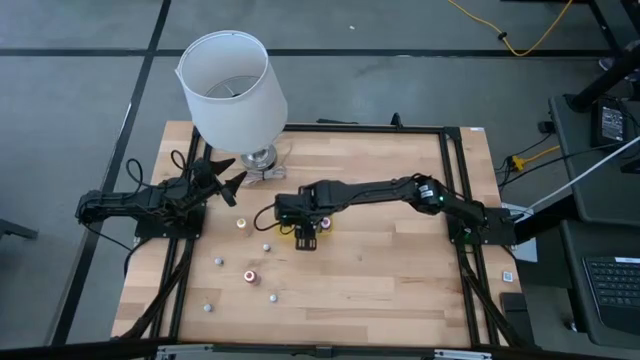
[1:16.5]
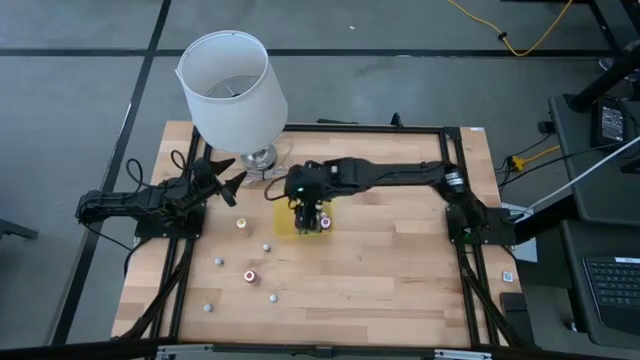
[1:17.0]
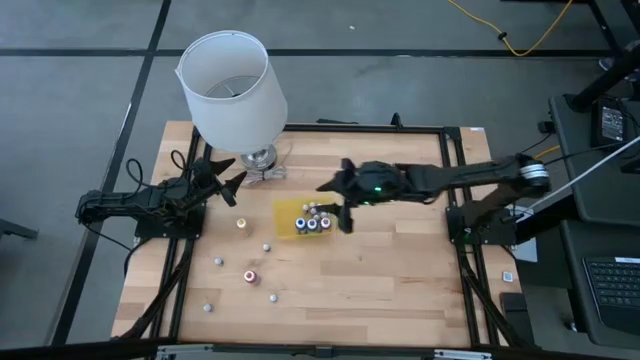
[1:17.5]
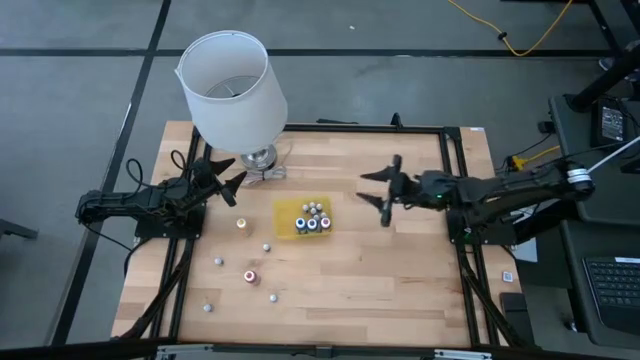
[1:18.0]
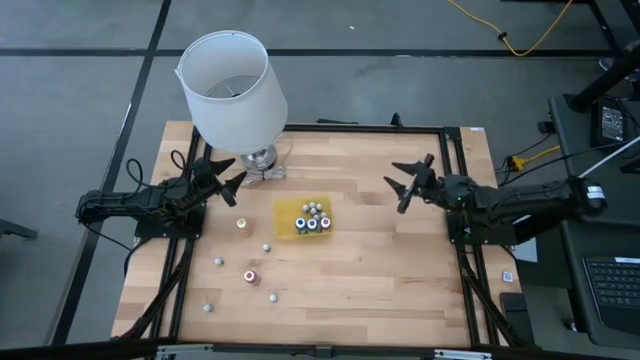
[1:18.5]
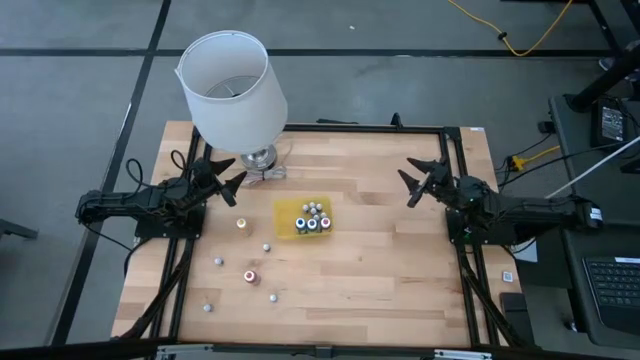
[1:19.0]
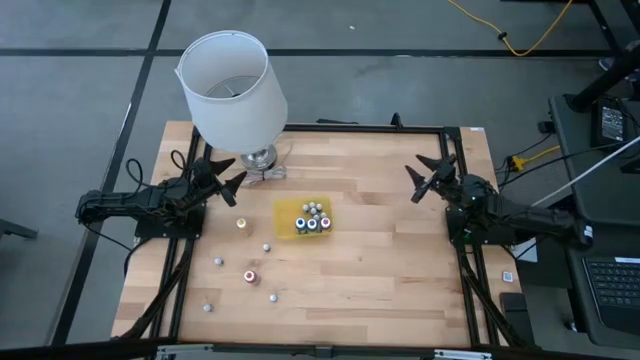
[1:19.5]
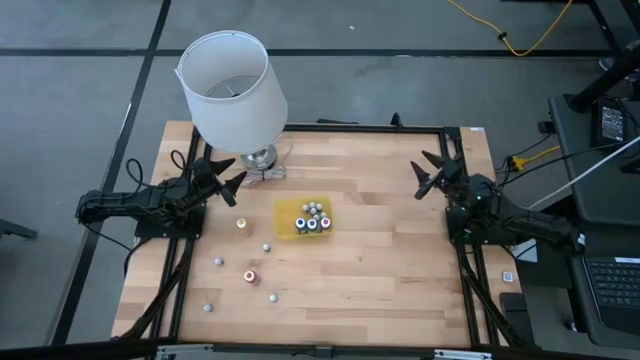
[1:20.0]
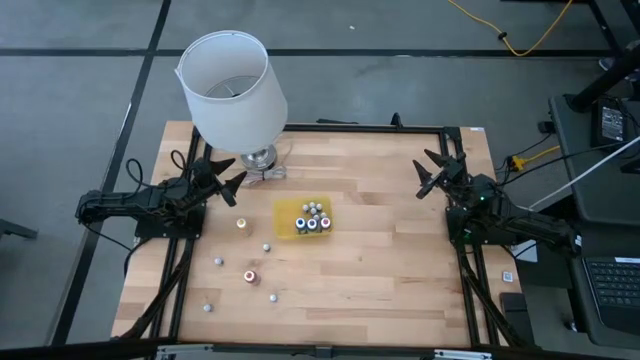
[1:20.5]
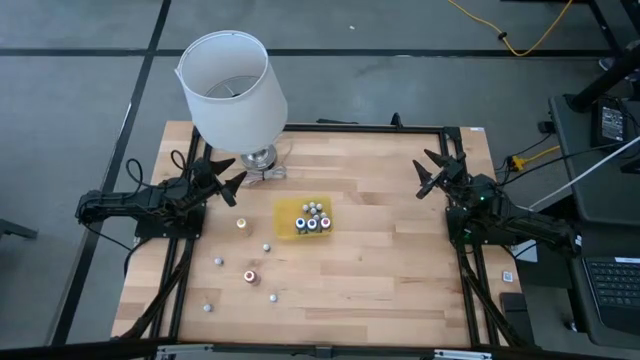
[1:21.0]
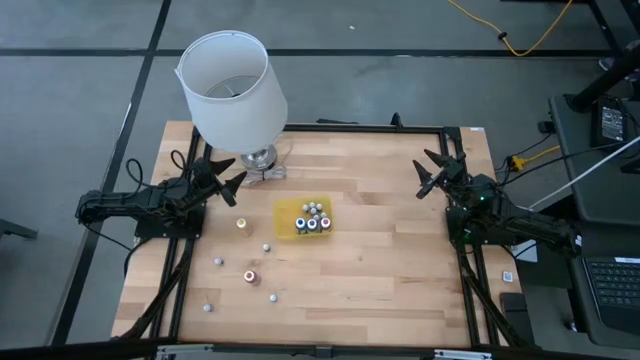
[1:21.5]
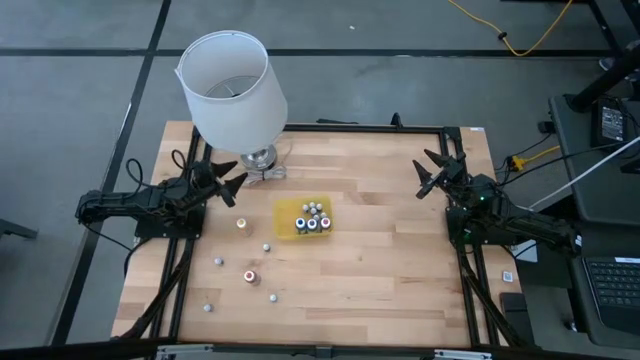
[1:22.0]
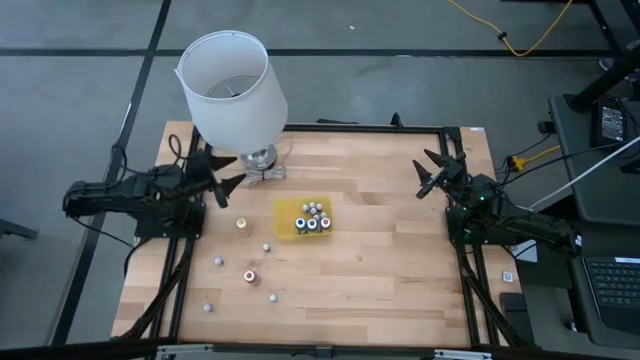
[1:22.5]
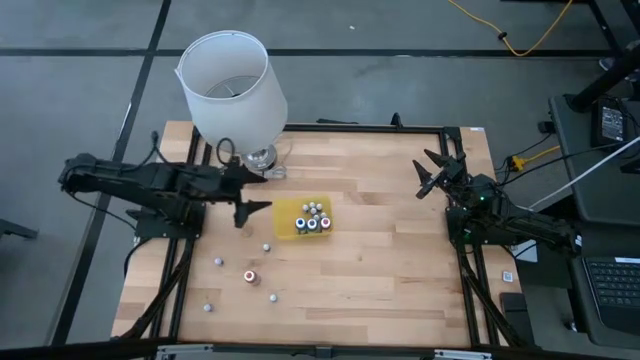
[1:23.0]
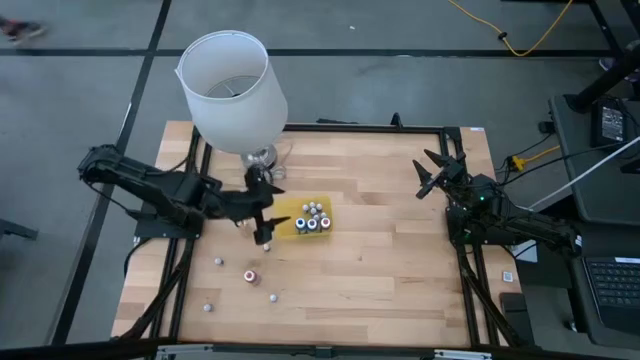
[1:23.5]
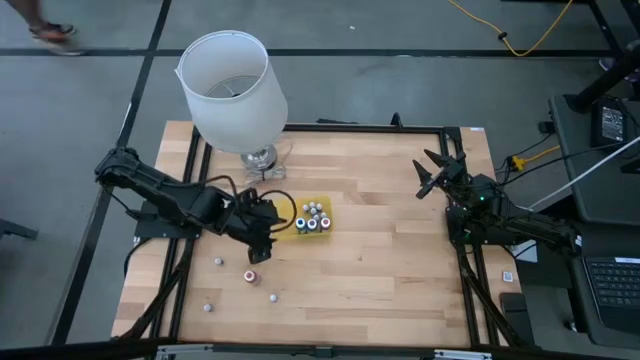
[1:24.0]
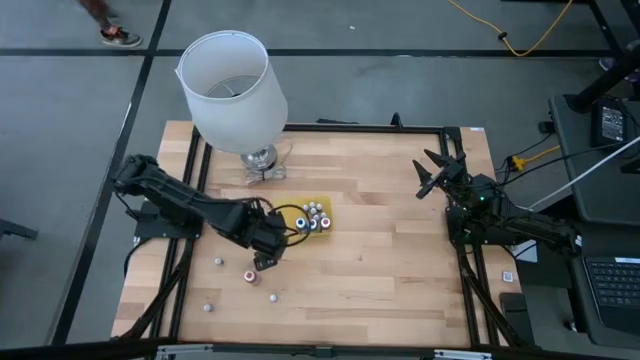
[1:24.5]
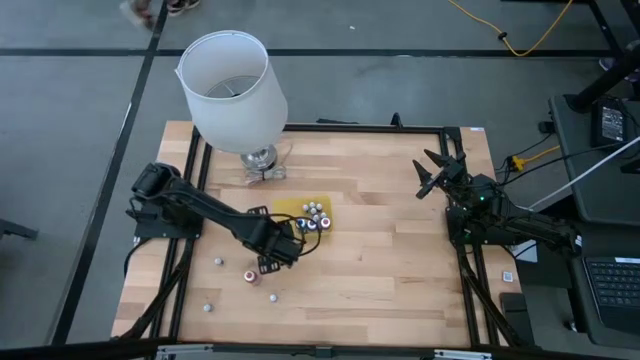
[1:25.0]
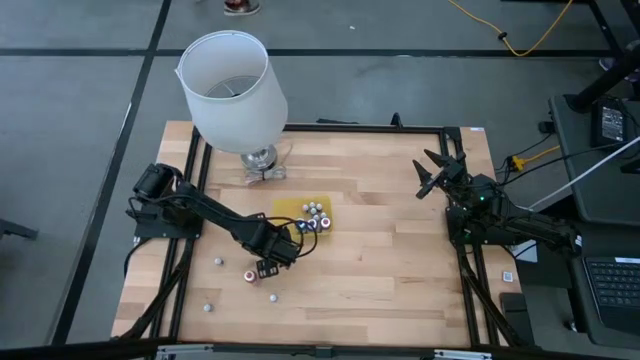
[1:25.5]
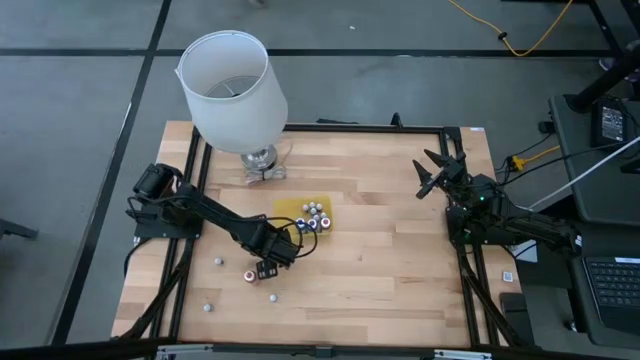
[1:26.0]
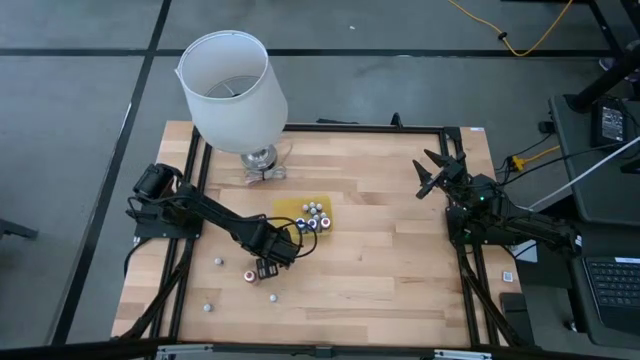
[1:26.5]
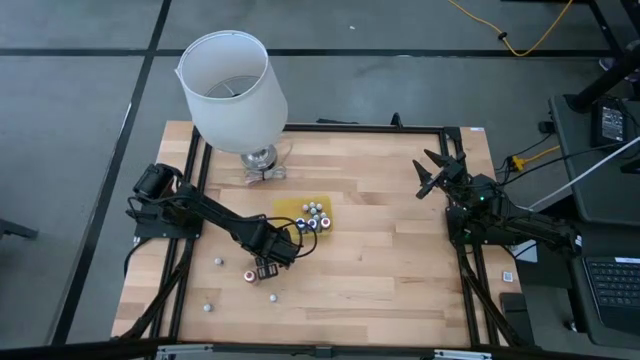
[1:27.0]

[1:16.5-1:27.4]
Task: Pick & Place food coloring
Put the black food coloring bottle into the yellow bin

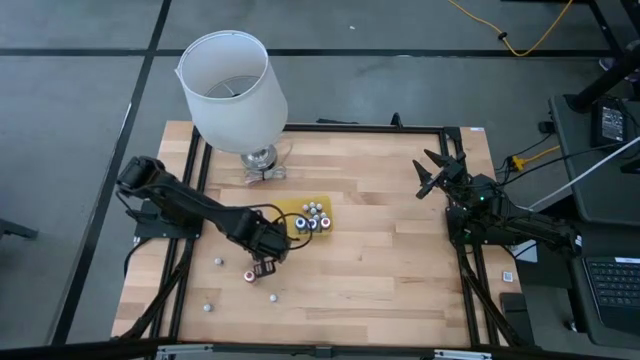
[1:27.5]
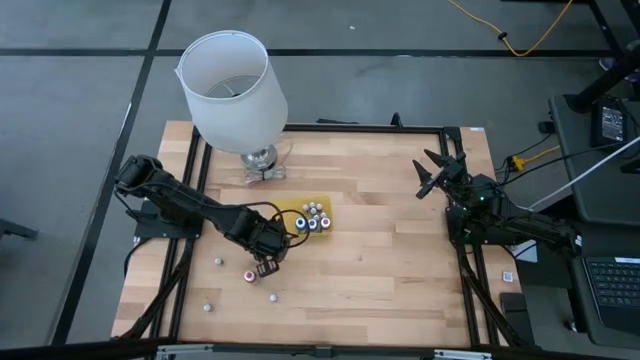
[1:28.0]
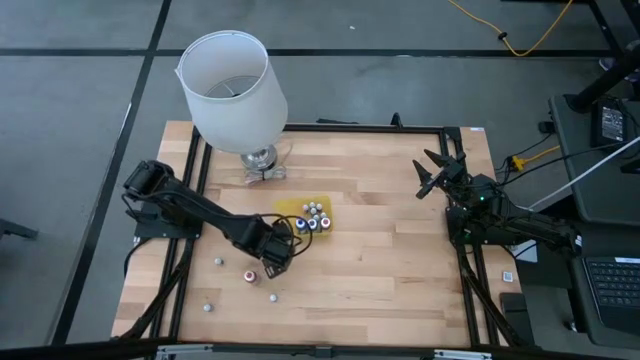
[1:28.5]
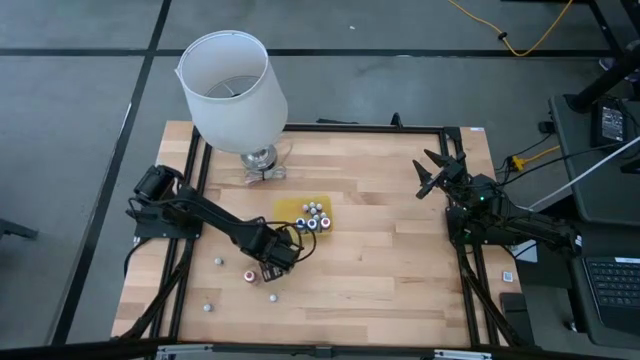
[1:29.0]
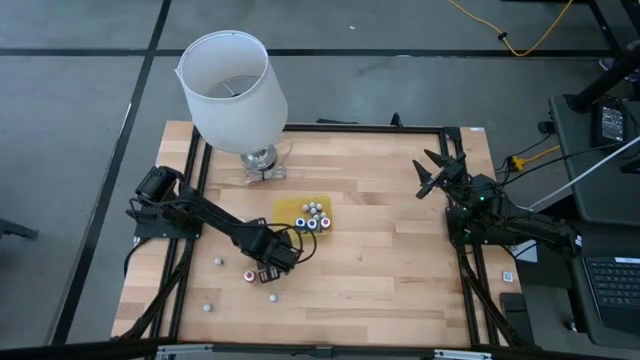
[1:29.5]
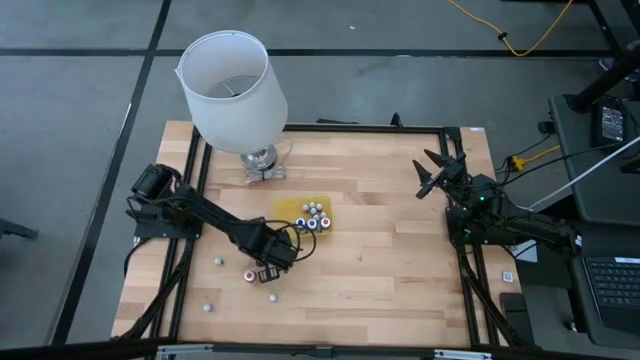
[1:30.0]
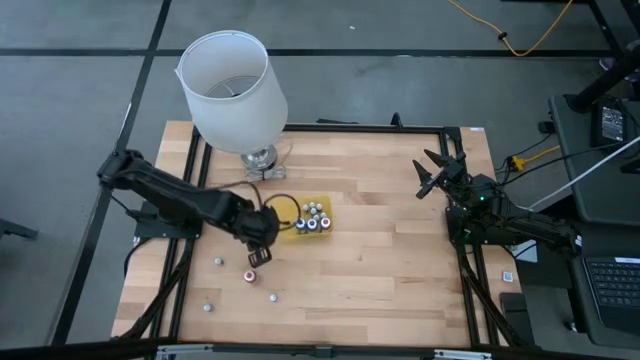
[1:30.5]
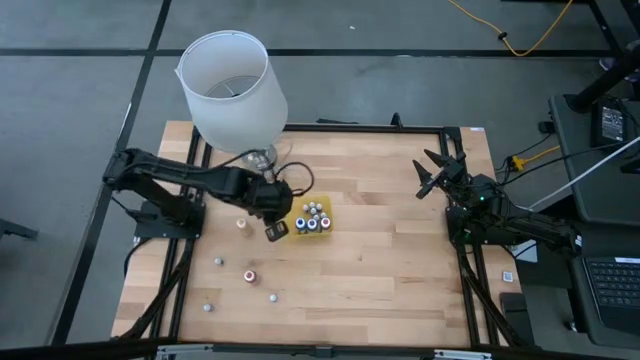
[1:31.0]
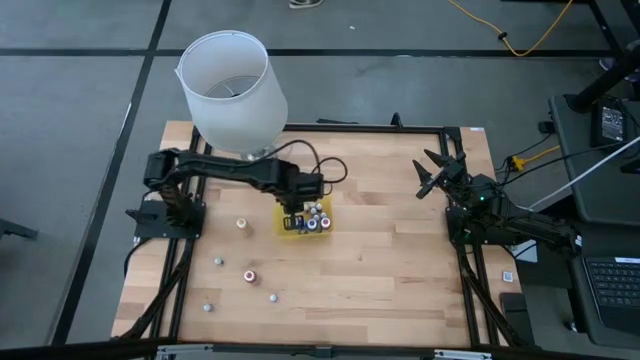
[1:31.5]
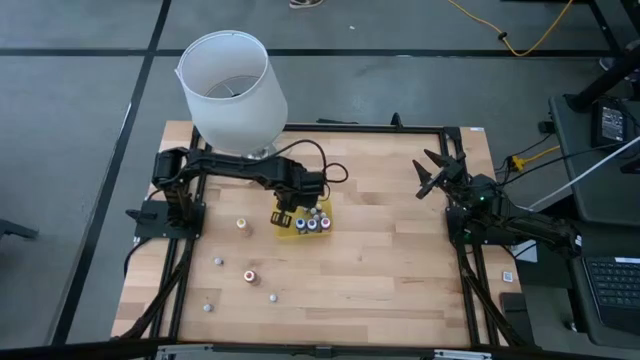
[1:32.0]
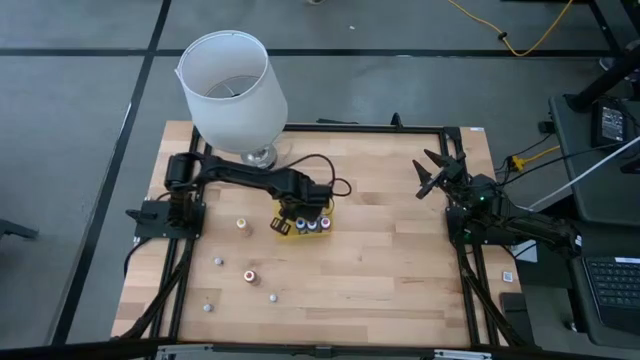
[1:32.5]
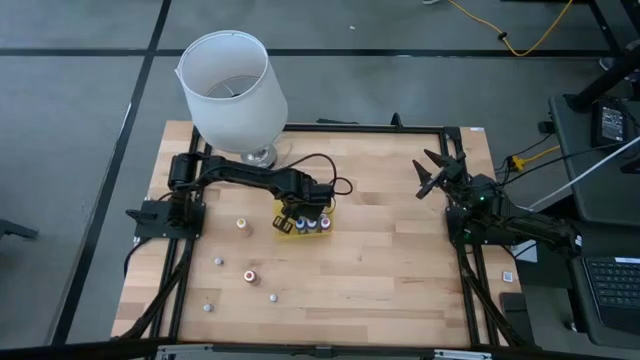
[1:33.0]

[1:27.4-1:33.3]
Put the black food coloring bottle into the yellow bin

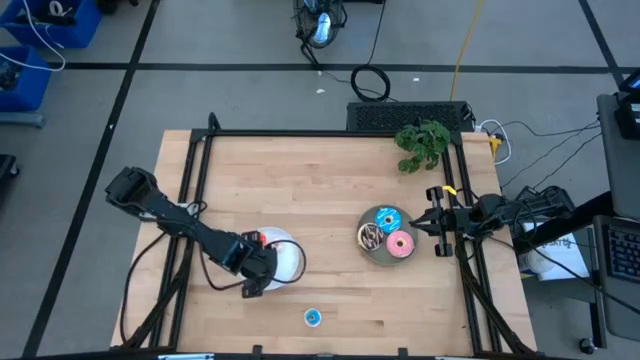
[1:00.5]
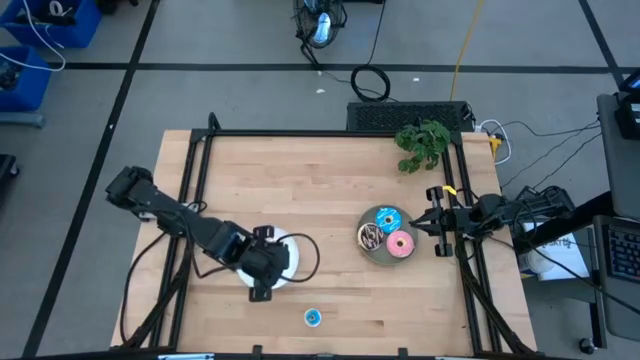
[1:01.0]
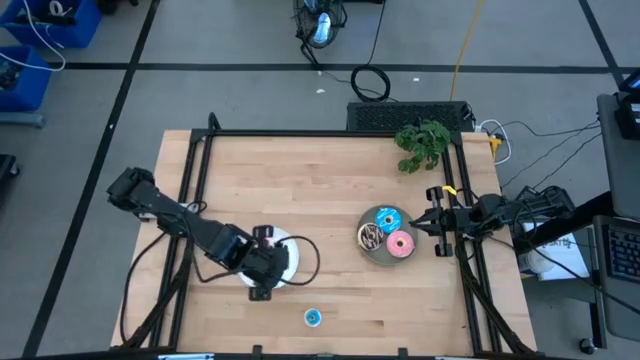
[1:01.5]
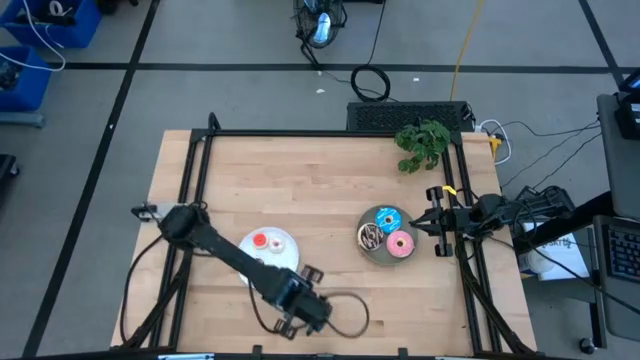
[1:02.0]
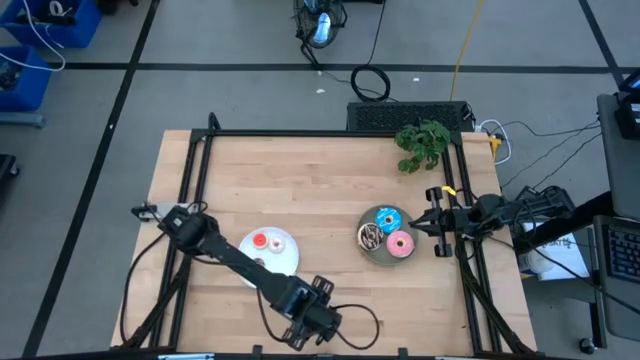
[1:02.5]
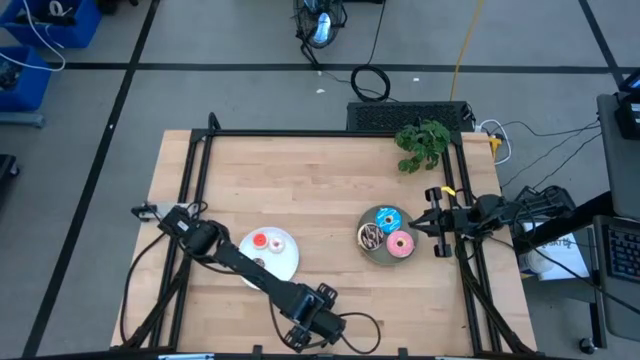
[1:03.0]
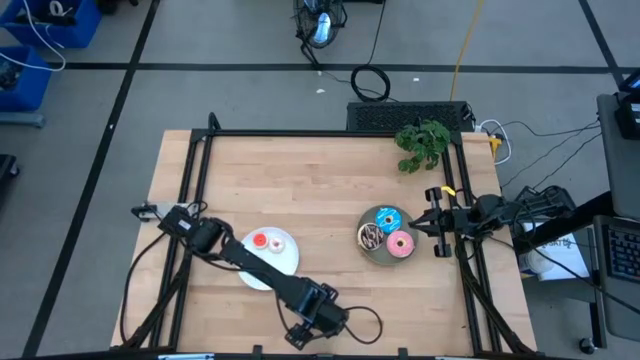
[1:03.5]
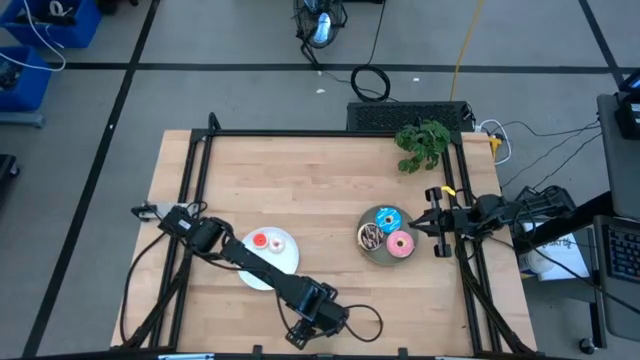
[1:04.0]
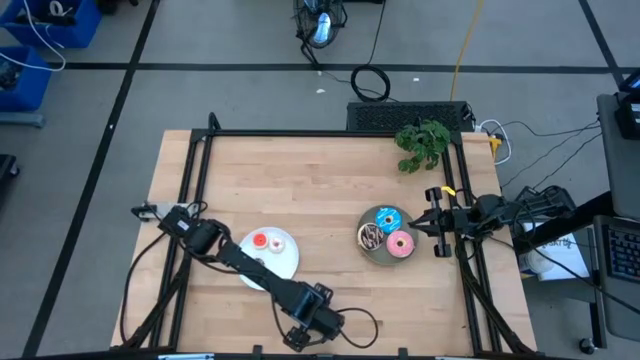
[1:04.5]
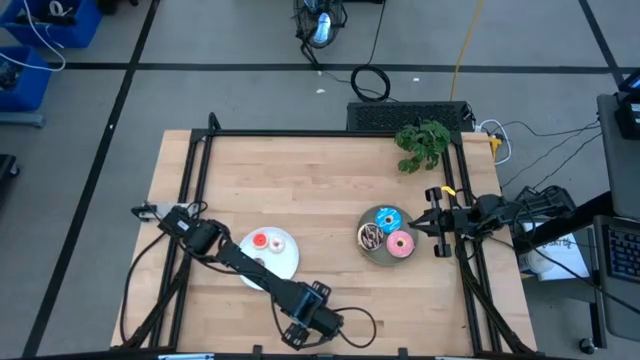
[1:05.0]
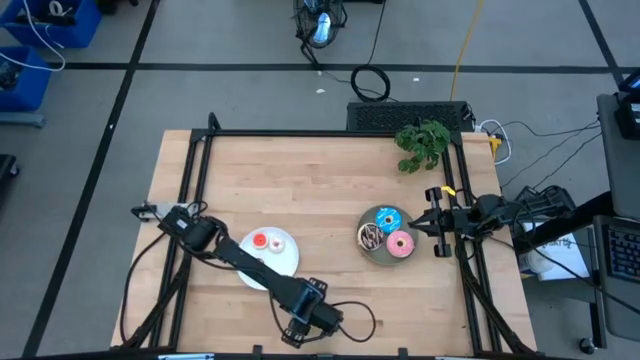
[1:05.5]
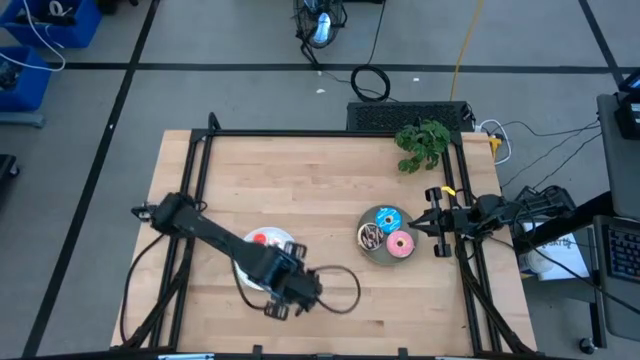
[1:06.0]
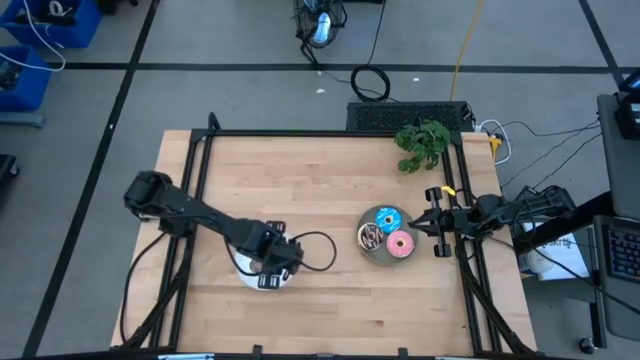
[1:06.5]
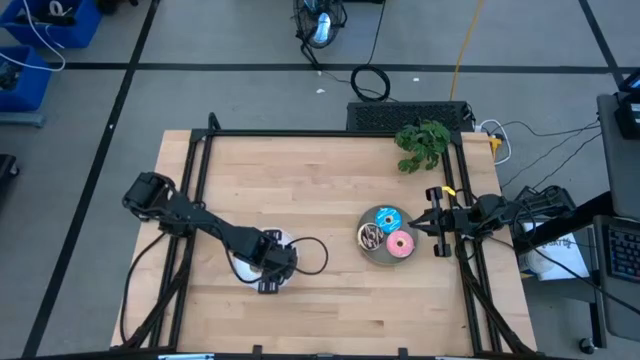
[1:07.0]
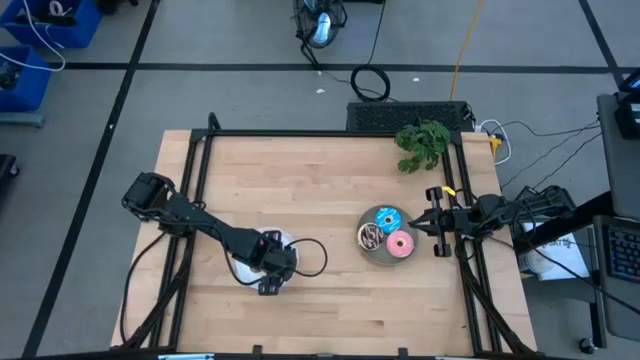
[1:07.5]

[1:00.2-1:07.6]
Task: Pick & Place donuts
Put the small blue donut on the white plate
